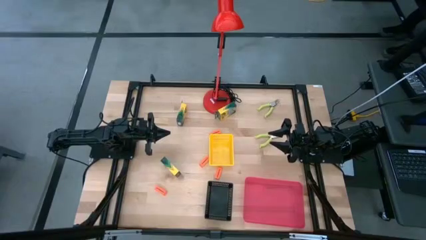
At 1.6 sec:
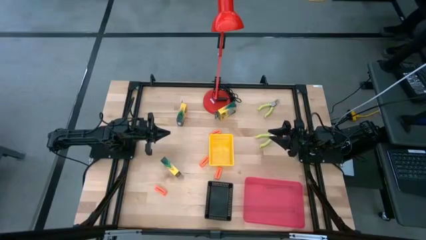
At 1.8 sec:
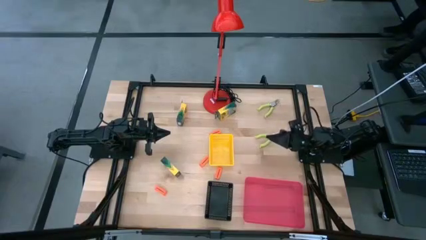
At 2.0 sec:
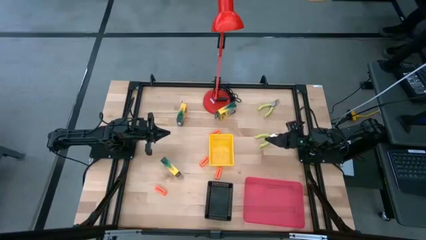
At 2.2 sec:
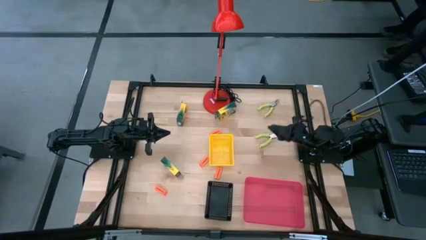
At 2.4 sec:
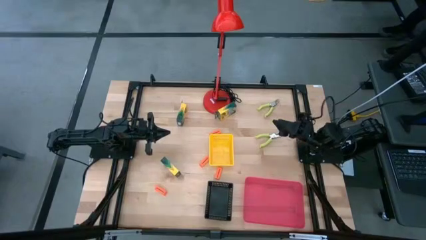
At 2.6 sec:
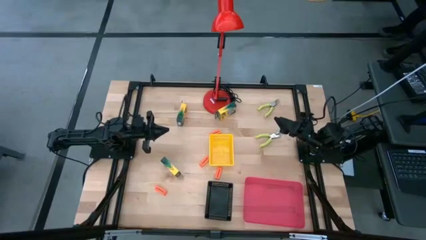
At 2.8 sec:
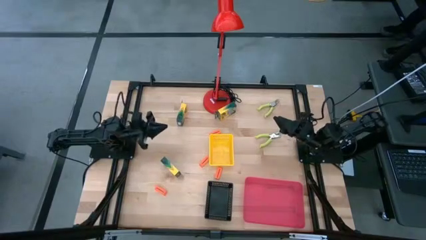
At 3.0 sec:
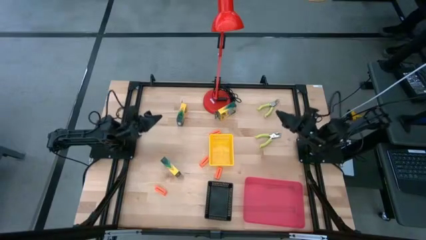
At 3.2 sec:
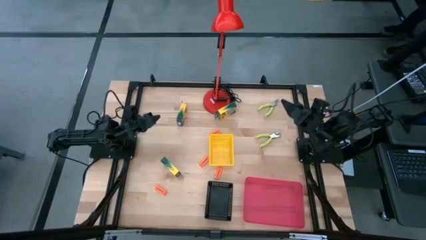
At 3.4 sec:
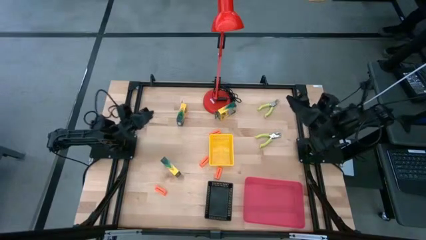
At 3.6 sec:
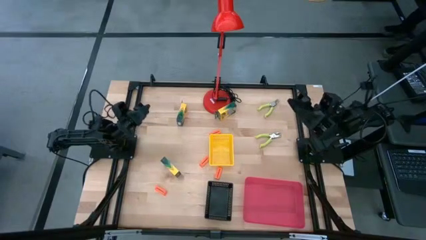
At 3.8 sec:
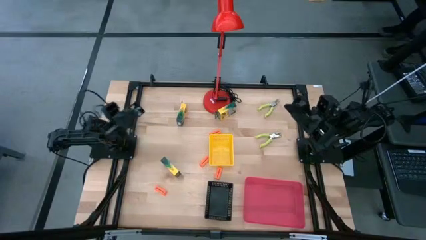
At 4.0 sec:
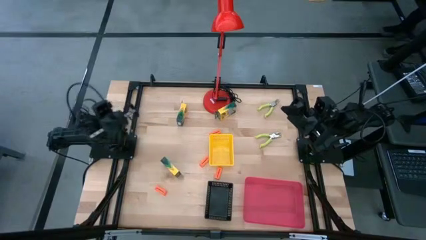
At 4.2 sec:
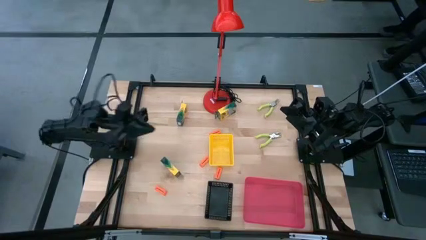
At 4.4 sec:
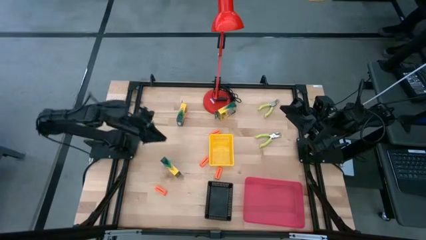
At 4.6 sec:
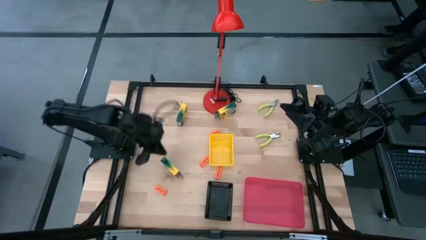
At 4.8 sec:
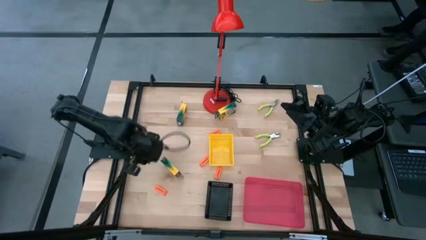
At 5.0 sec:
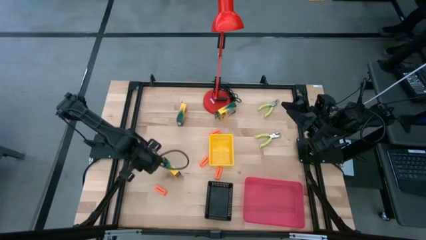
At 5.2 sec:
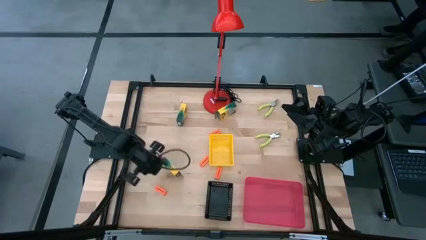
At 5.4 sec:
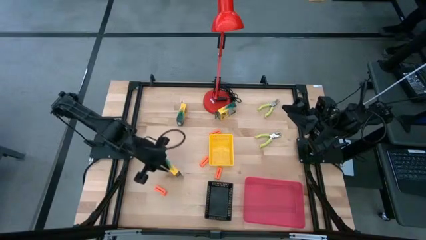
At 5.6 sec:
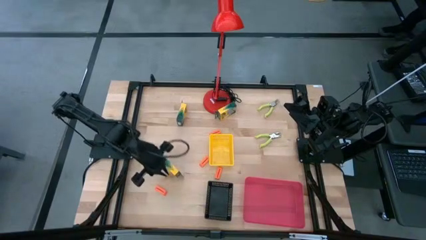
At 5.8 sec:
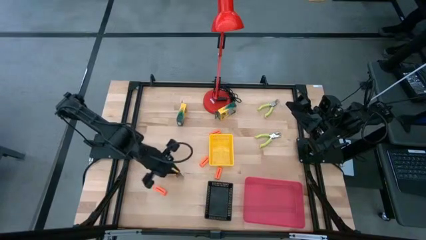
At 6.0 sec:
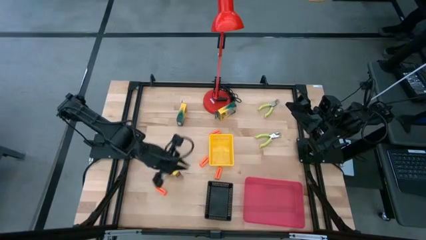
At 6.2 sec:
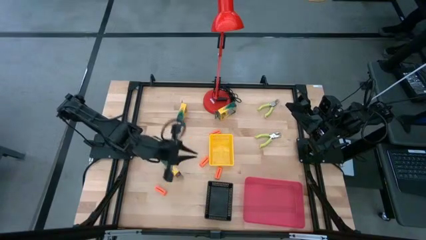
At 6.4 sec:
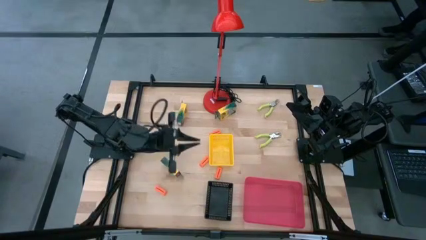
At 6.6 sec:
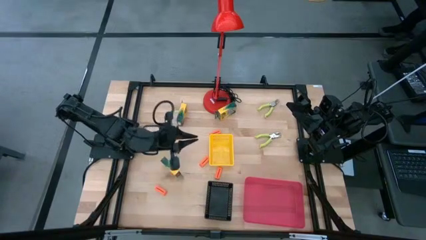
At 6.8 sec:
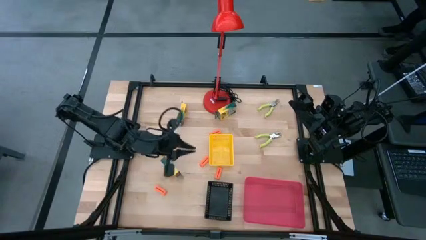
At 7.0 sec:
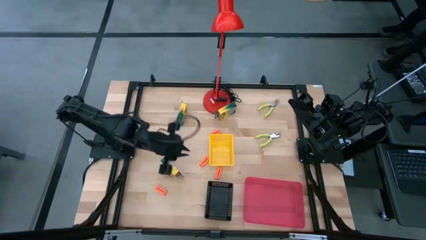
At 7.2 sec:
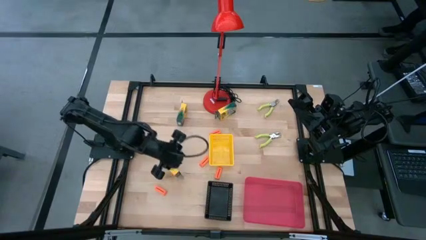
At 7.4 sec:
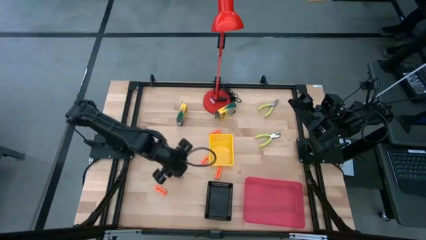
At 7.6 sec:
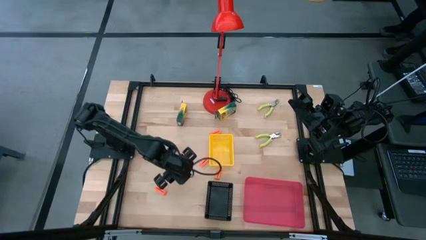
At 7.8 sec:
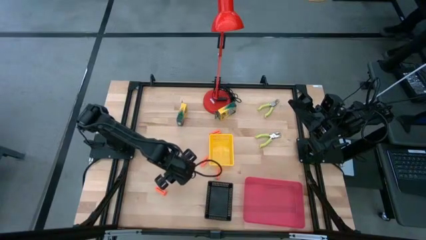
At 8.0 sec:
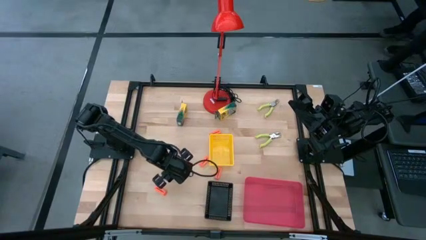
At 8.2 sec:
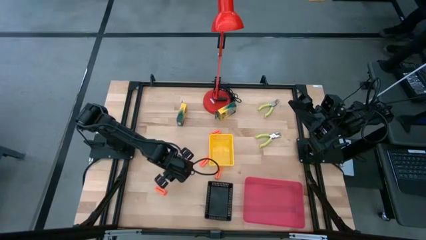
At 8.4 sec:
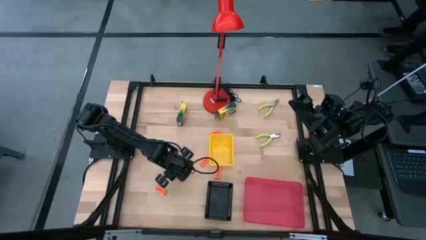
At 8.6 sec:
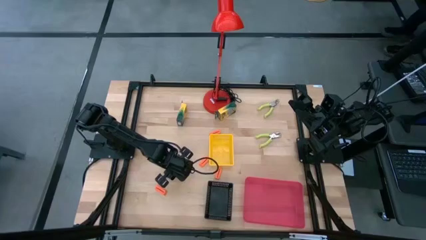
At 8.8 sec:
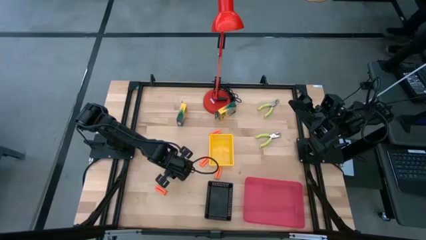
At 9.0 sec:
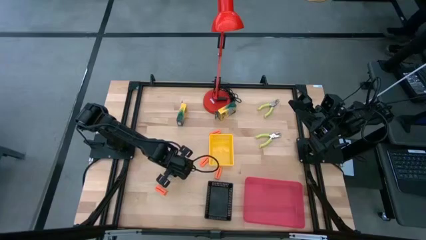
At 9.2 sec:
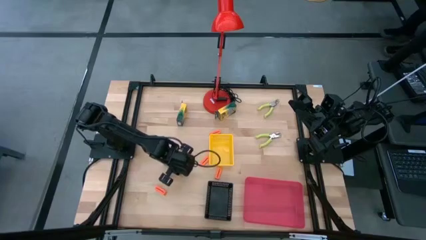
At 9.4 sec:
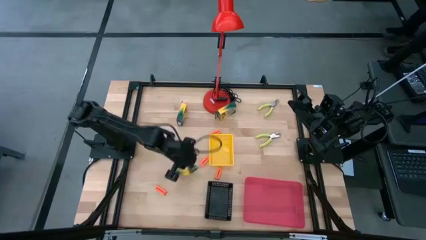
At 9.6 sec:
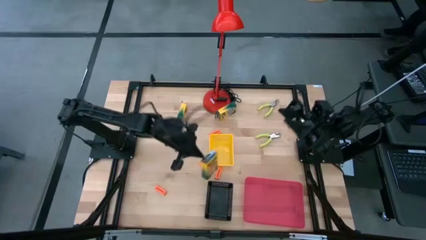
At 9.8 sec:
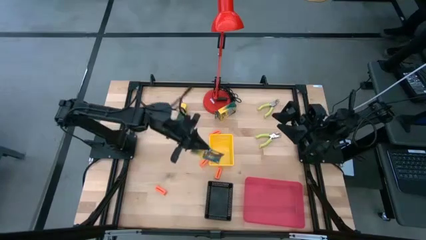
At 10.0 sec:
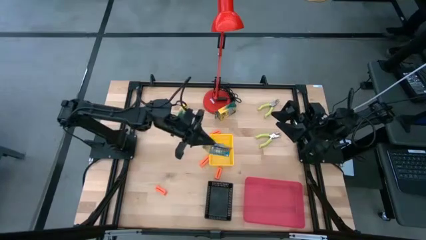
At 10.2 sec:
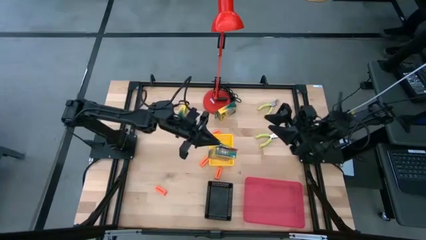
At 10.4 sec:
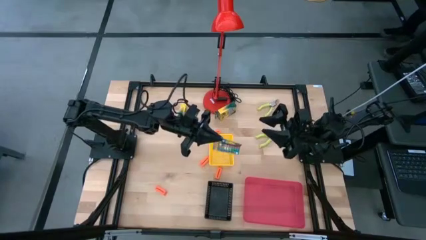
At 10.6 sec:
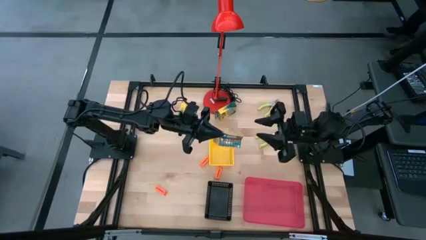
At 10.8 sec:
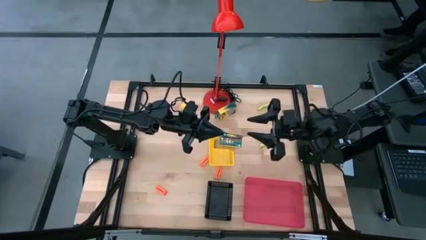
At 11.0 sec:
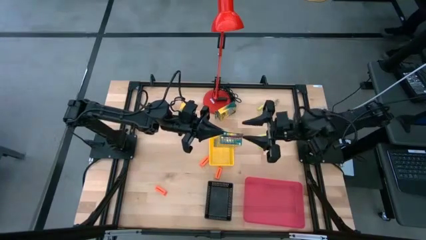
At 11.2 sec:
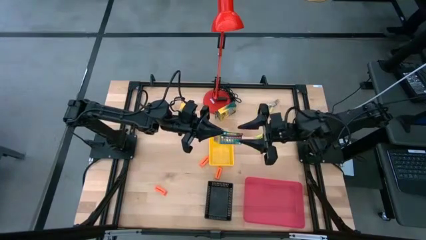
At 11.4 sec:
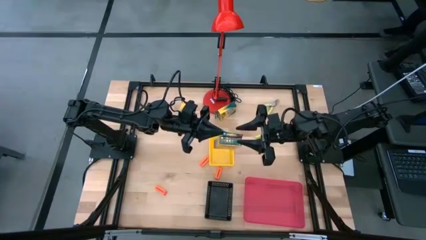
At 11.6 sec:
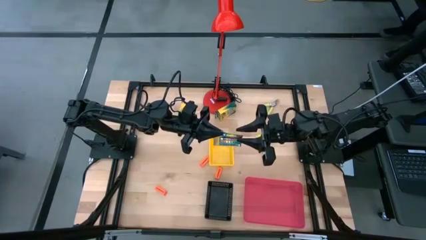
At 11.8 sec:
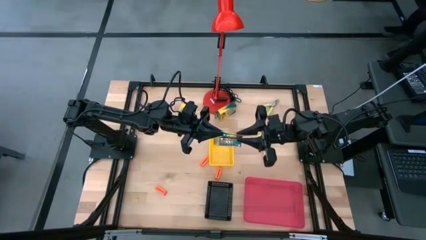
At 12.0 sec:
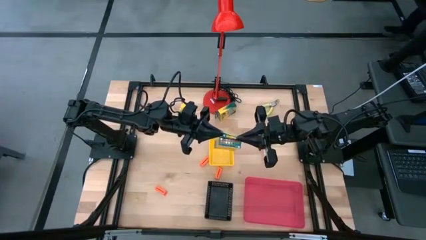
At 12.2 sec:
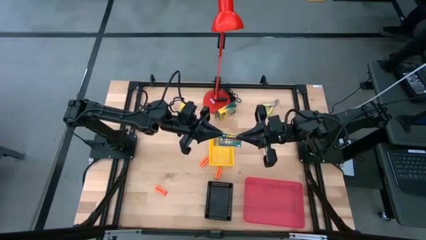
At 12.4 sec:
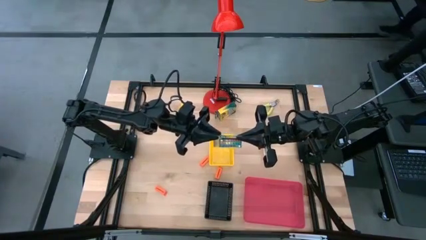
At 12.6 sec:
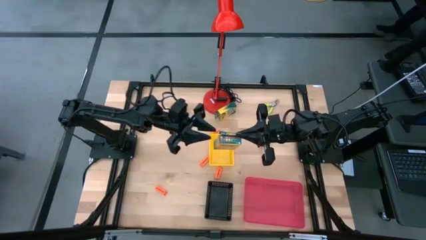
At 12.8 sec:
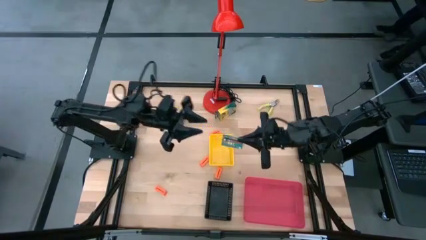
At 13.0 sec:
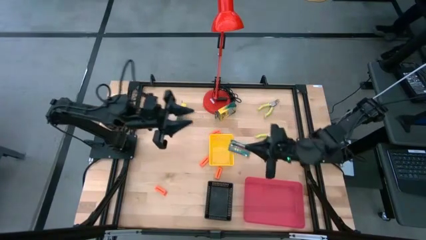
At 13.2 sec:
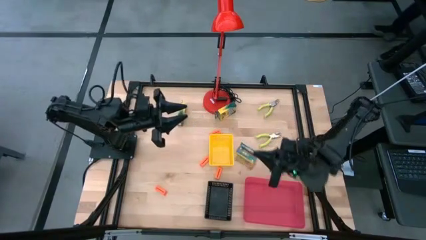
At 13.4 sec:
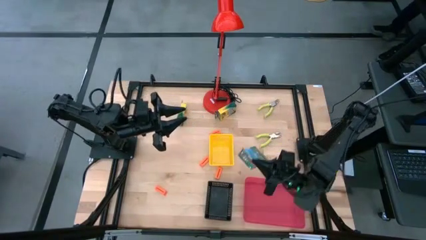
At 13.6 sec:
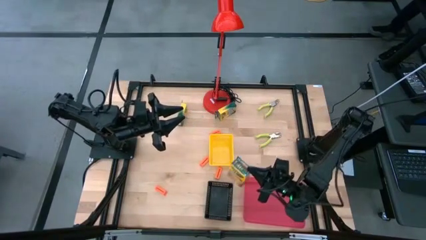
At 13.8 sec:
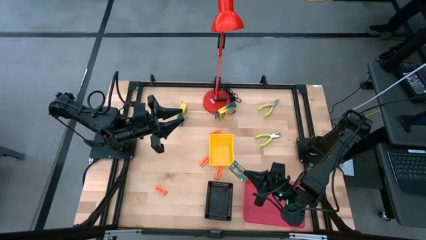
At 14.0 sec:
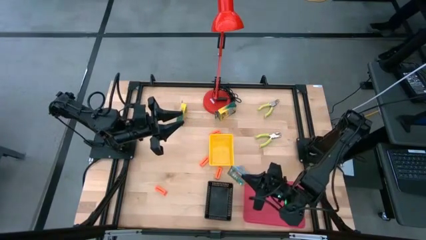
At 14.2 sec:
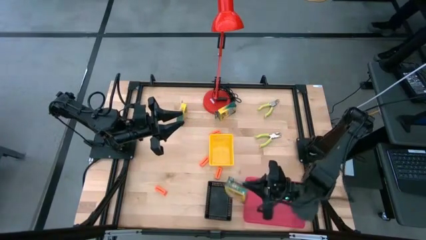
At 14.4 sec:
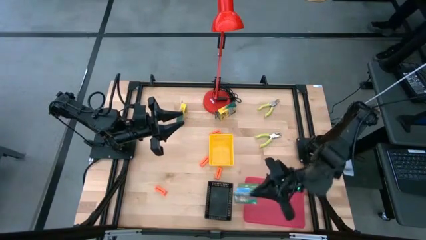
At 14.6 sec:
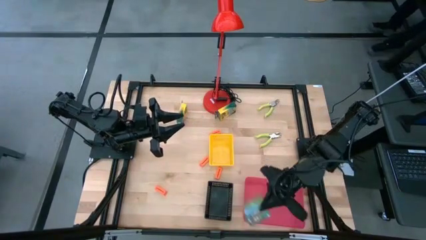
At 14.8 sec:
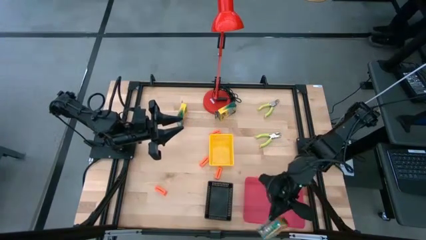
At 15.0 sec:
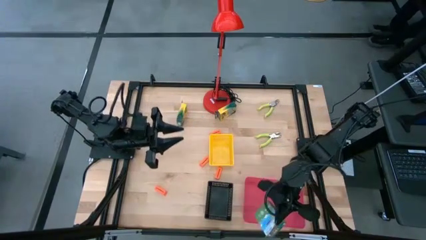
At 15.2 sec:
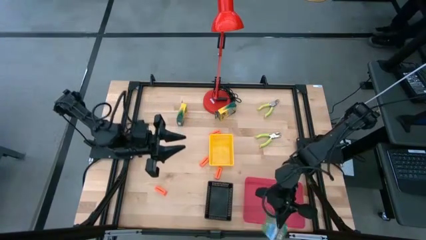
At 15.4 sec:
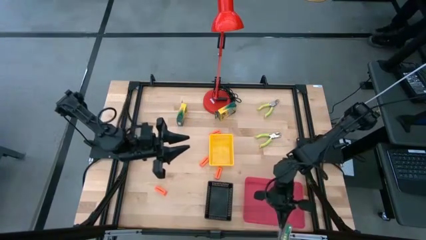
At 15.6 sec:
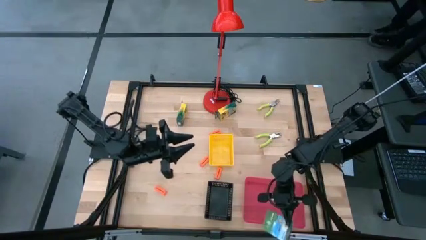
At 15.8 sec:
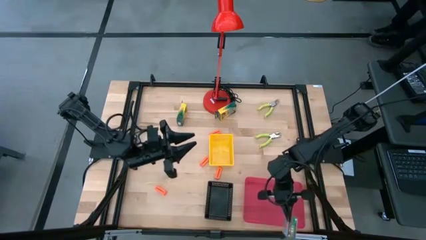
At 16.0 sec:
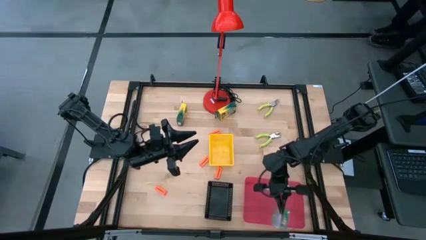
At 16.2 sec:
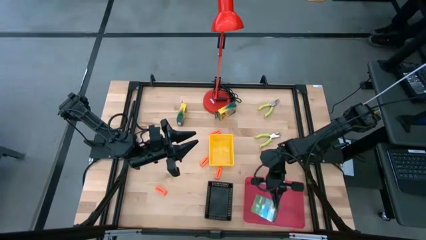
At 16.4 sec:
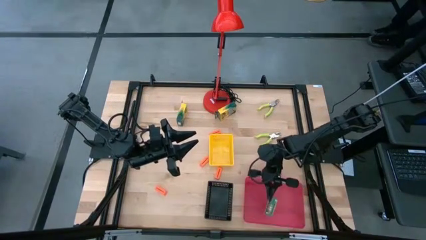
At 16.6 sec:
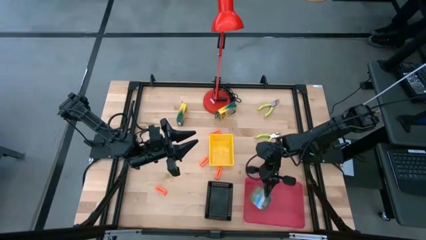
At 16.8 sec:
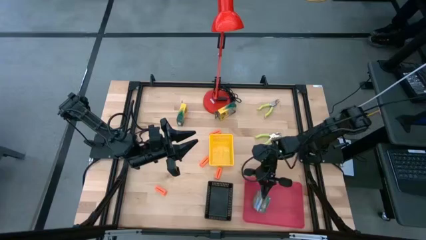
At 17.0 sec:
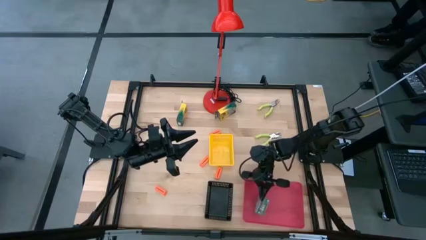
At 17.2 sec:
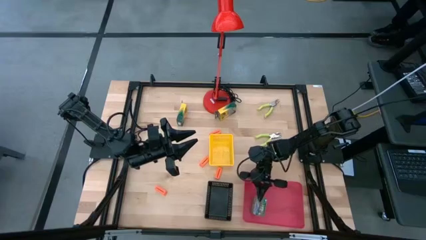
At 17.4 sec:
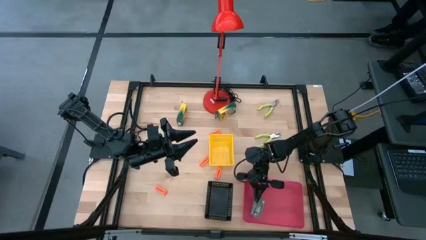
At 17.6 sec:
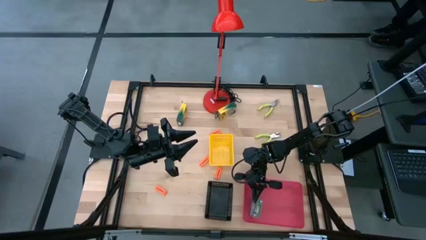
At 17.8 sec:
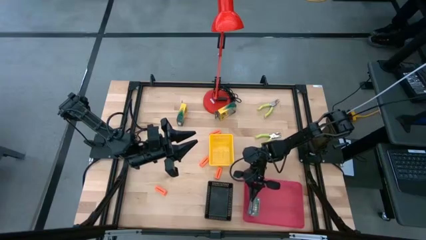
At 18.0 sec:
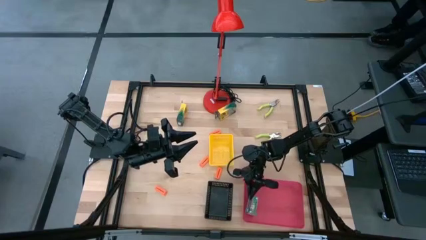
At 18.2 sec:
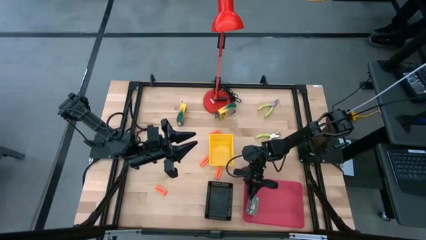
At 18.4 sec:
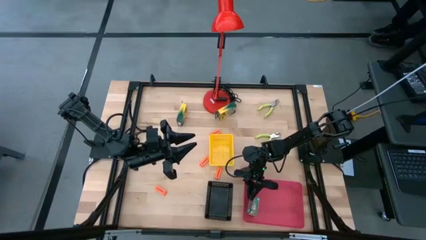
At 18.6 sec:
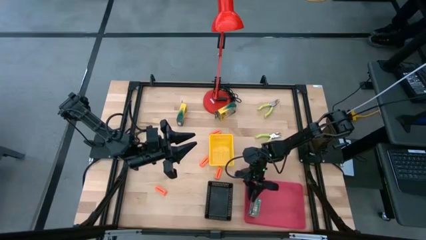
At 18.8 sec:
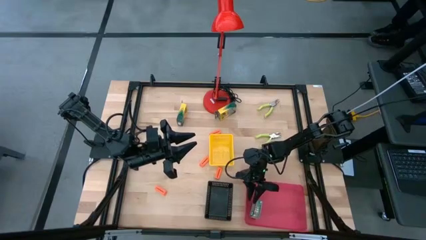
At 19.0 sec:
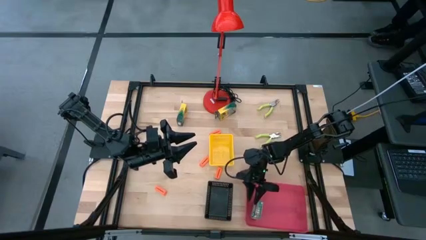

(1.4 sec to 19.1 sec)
Task: Pick & Place School Supplies
Put the yellow crayon box into the pink bin
